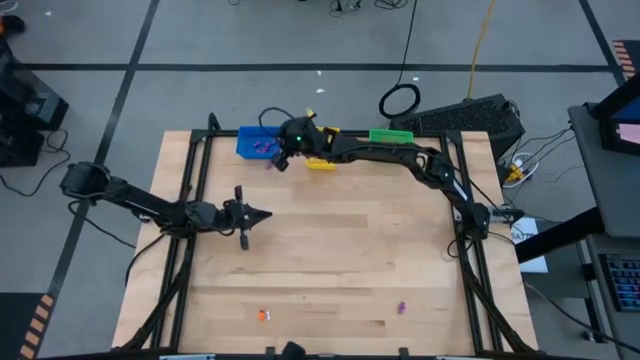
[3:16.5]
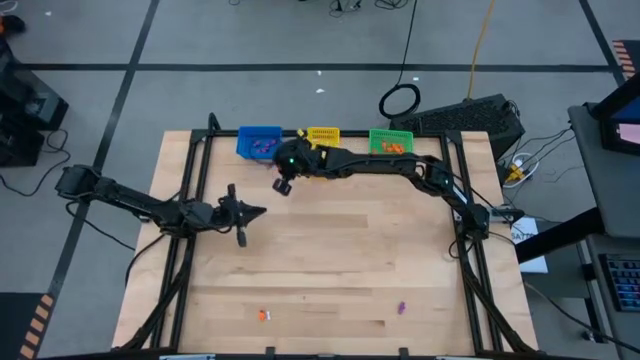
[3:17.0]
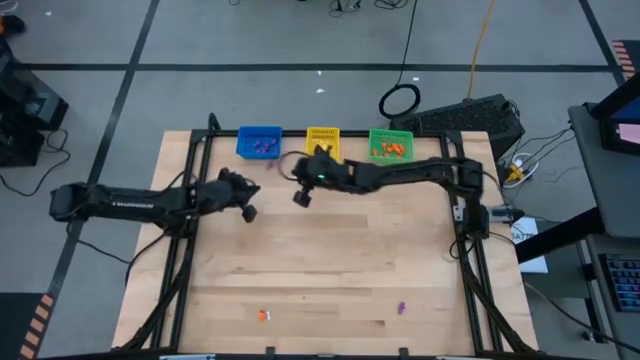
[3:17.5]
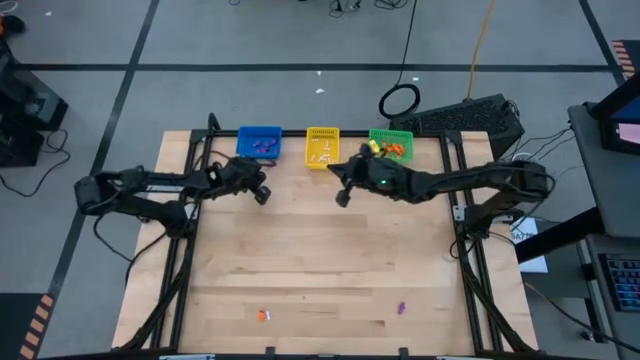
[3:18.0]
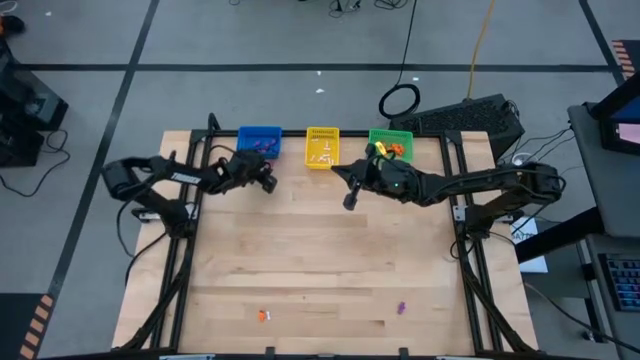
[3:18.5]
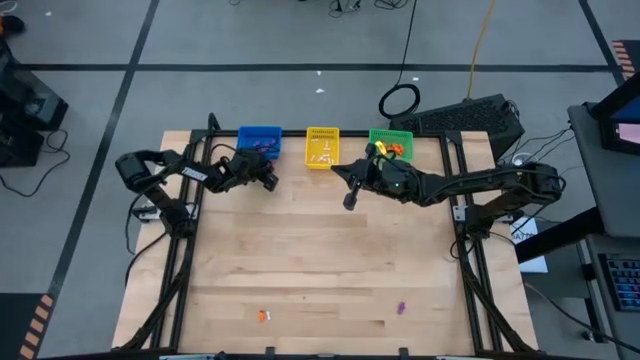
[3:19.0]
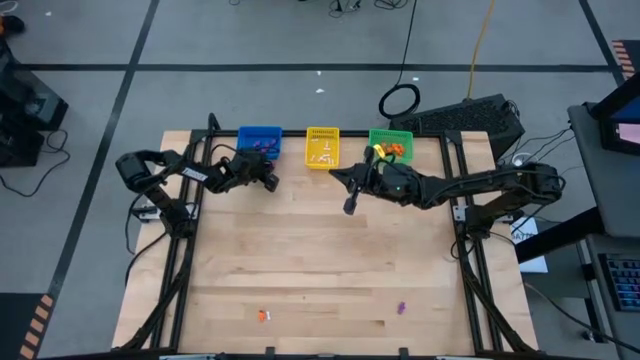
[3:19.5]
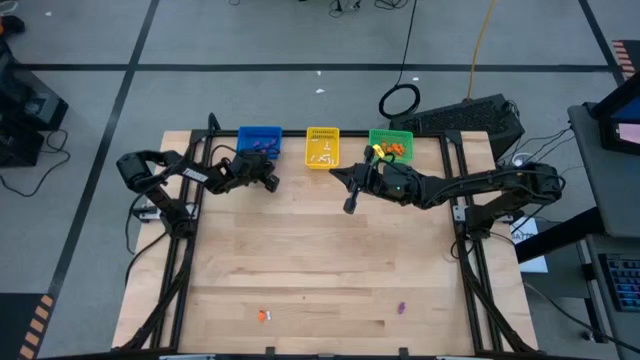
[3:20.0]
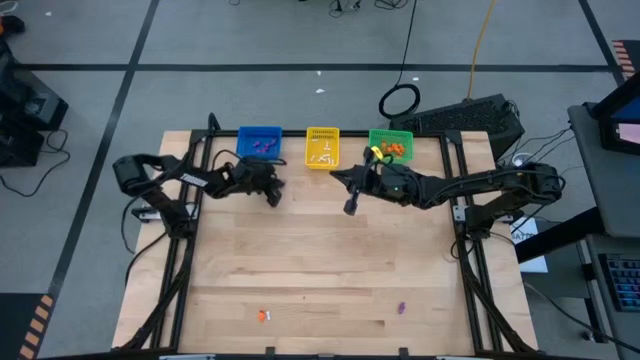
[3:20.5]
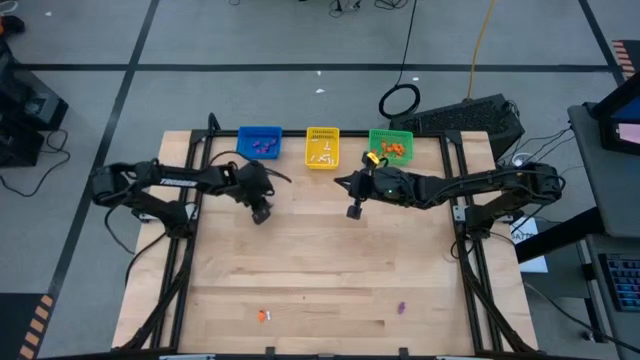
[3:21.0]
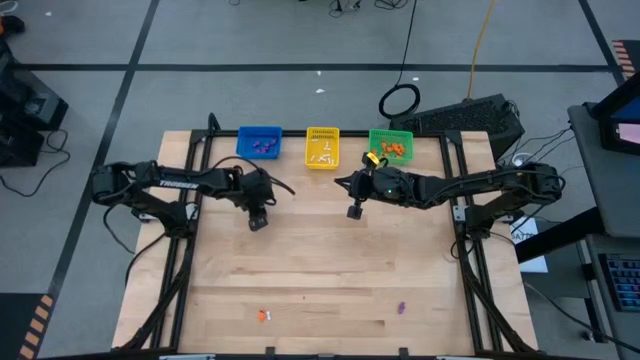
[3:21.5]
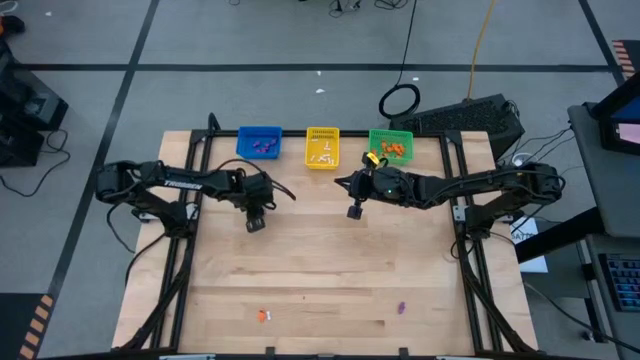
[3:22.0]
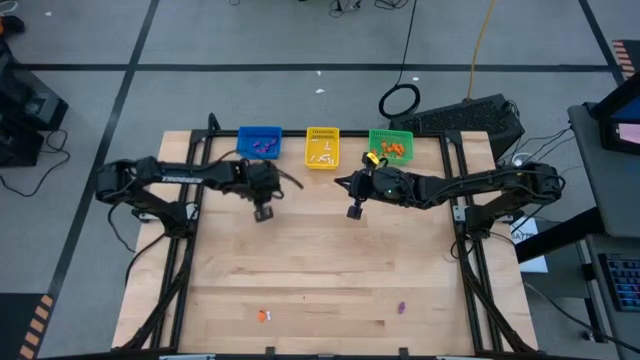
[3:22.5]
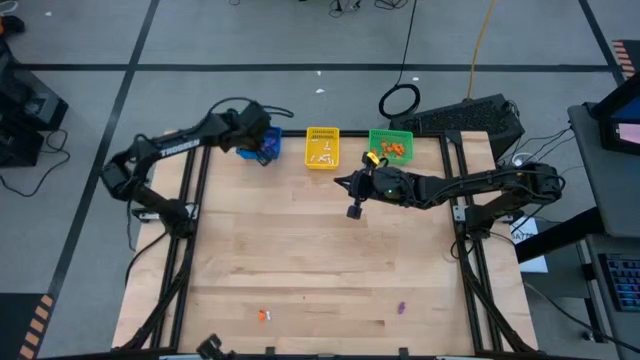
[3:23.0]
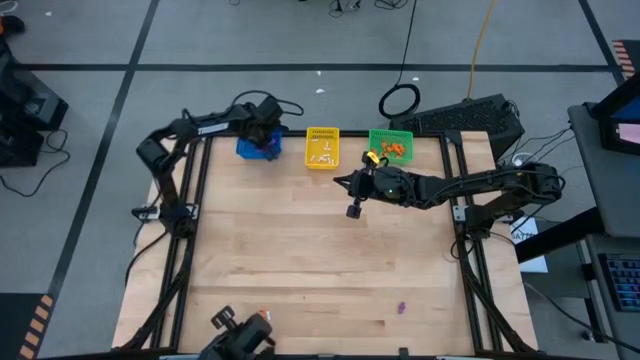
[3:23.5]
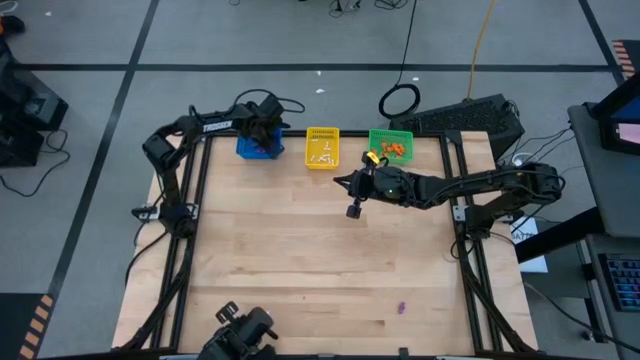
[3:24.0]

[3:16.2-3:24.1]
Task: Sort Halloween decoration
Put the violet skeleton toy into the blue bin

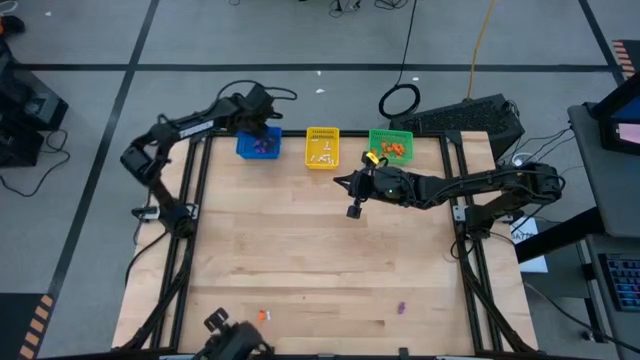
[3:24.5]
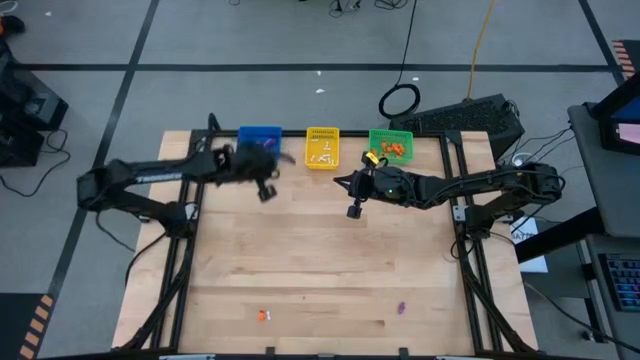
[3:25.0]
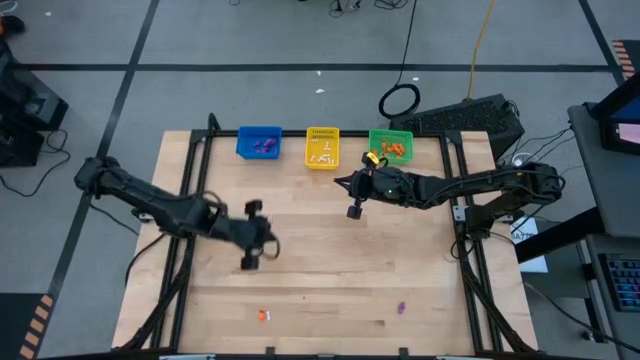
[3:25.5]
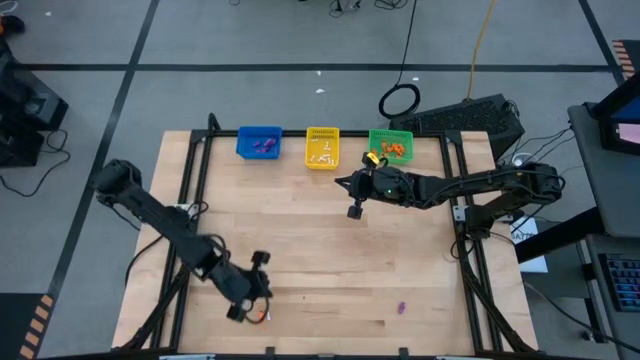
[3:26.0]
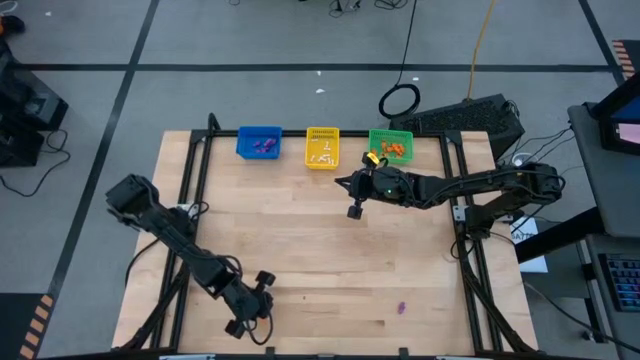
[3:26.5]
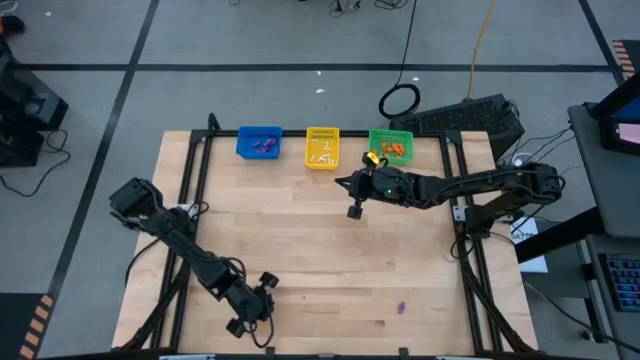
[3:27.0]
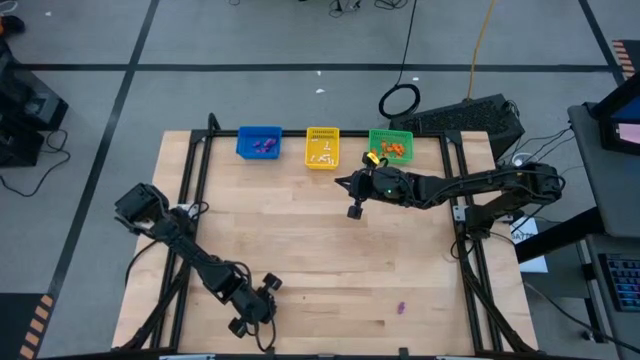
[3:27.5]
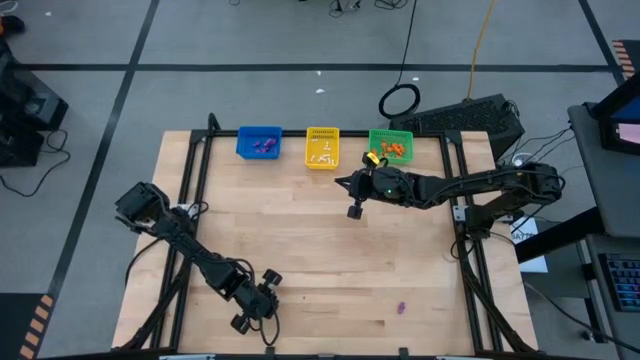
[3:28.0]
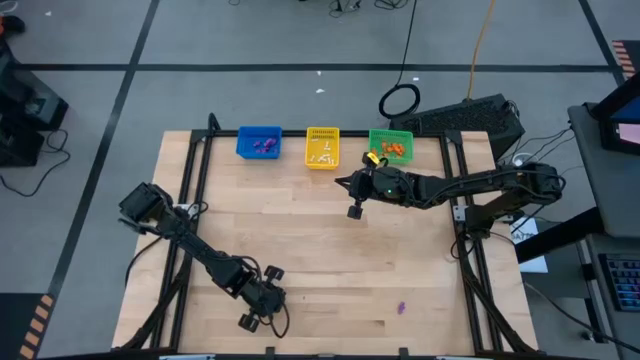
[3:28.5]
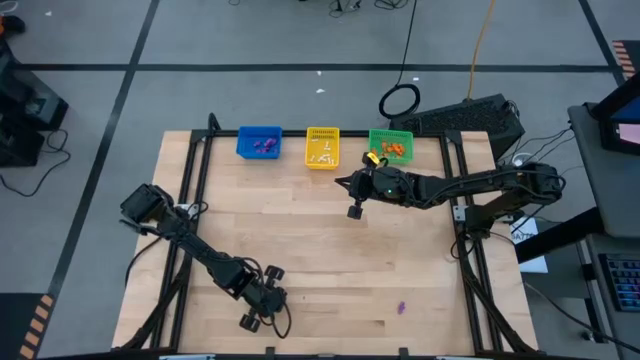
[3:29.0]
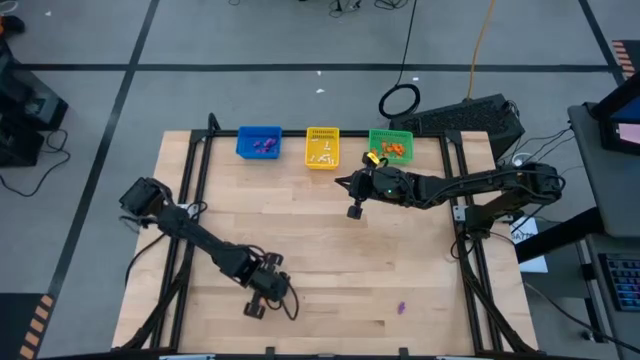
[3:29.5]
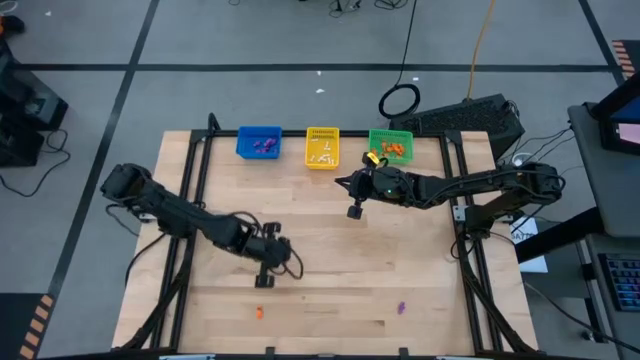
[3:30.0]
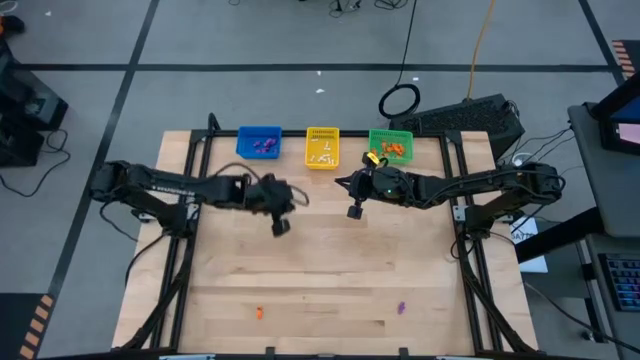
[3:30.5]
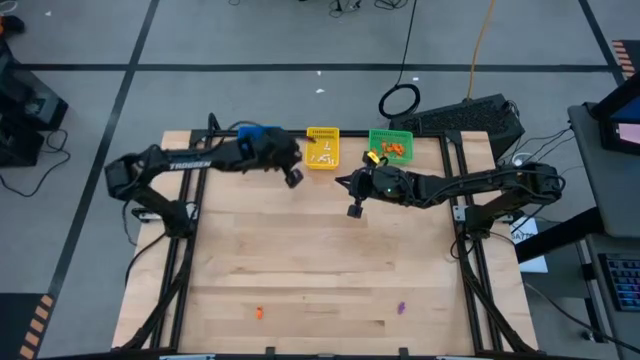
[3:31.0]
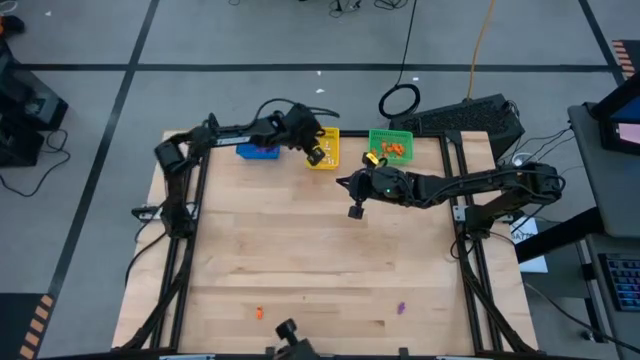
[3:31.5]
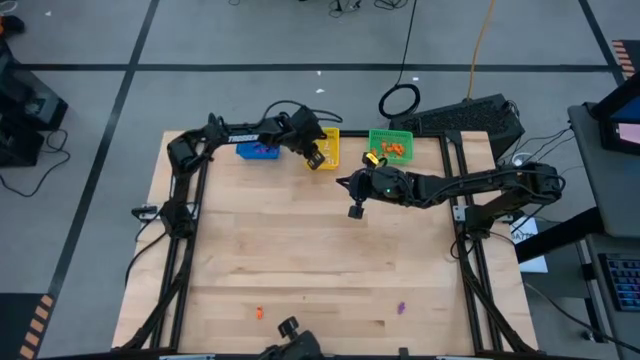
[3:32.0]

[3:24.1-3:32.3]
Put the white bone toy into the yellow bin

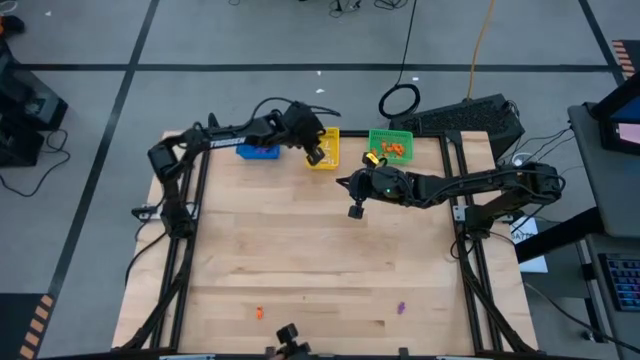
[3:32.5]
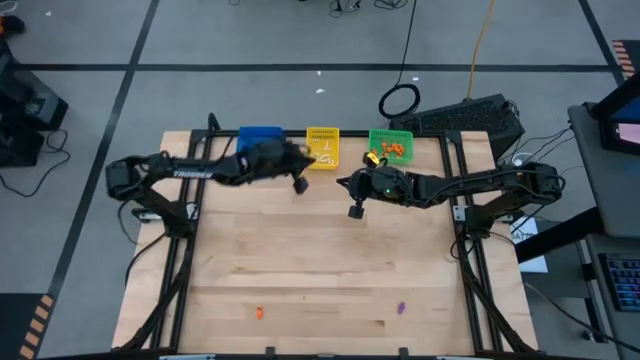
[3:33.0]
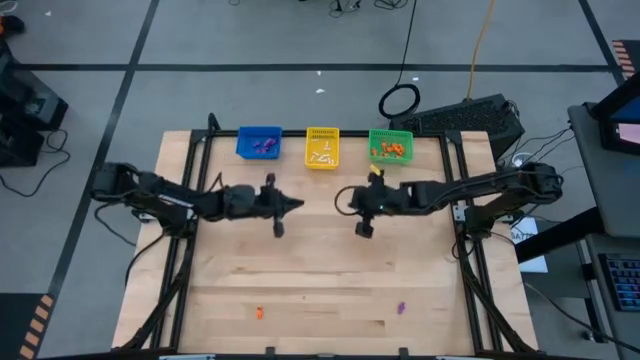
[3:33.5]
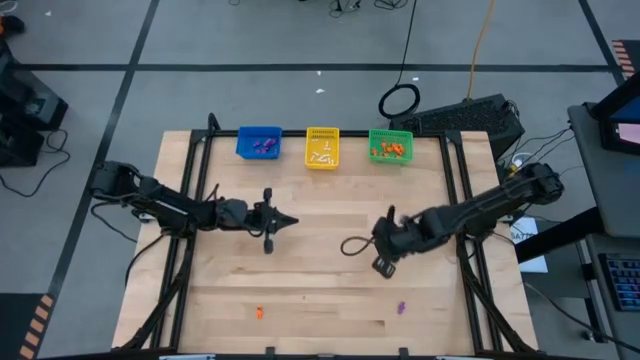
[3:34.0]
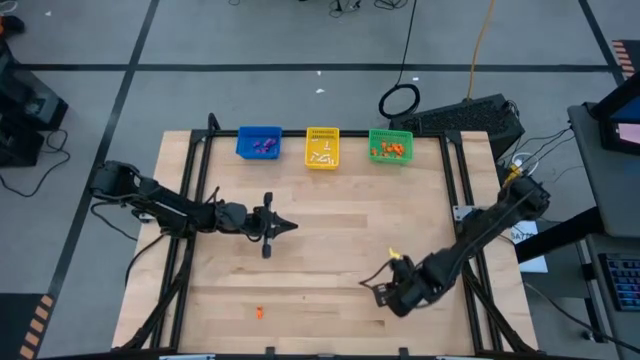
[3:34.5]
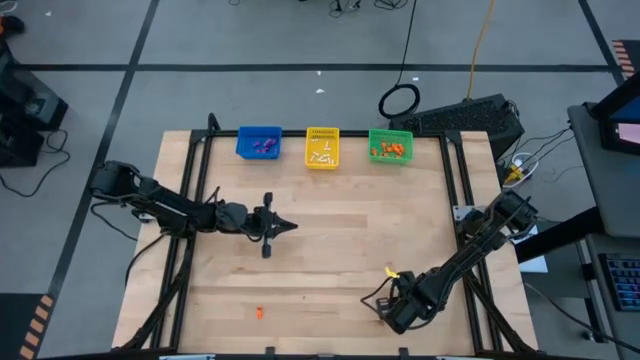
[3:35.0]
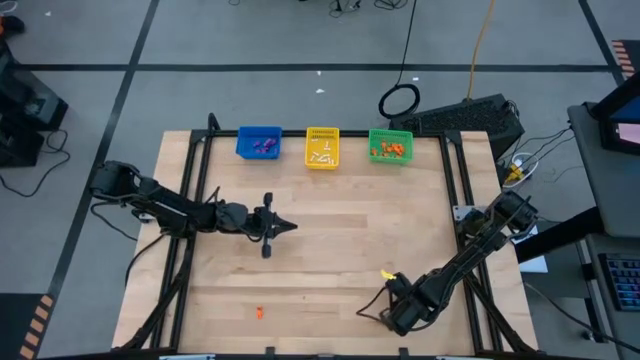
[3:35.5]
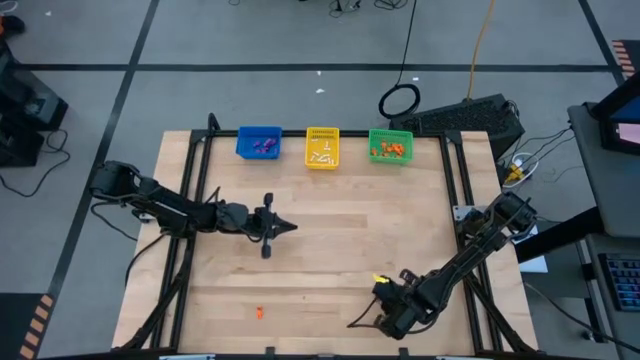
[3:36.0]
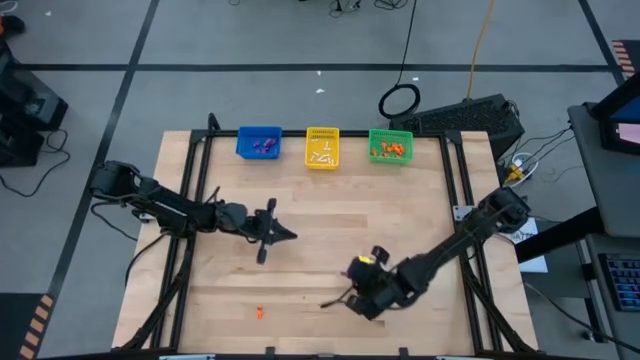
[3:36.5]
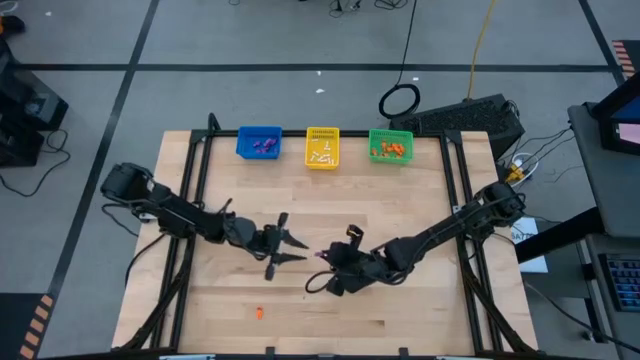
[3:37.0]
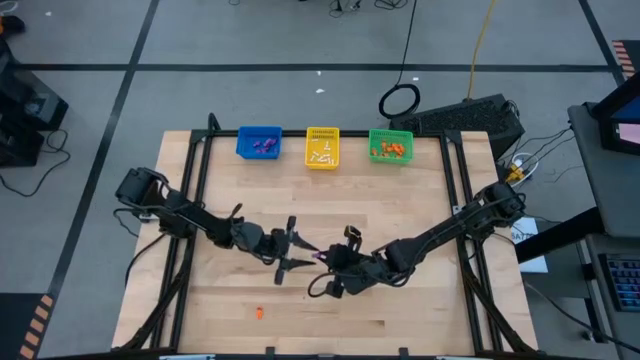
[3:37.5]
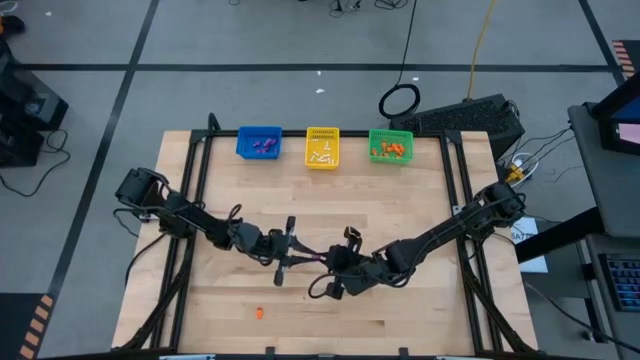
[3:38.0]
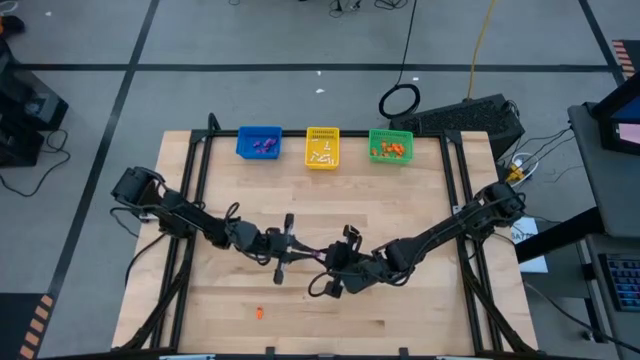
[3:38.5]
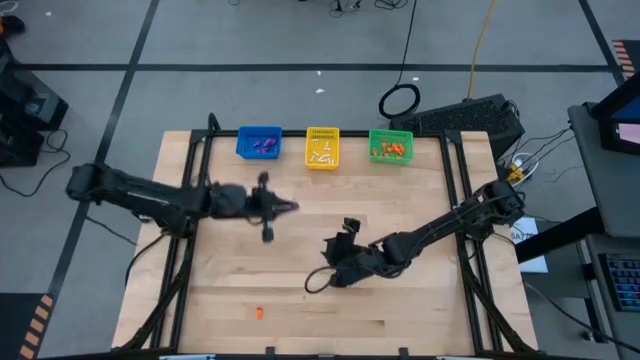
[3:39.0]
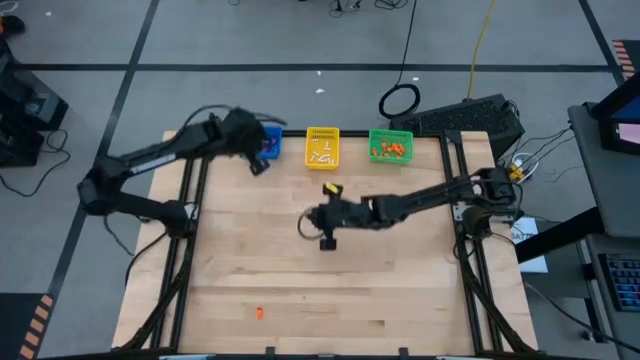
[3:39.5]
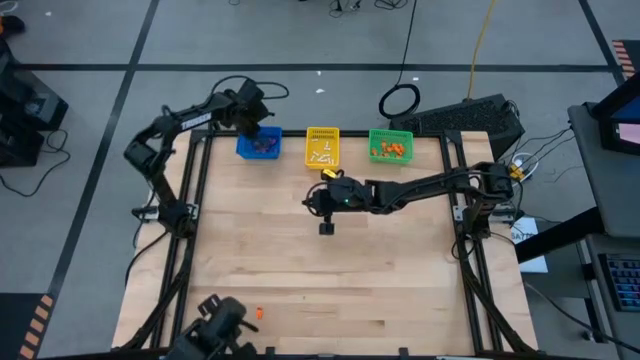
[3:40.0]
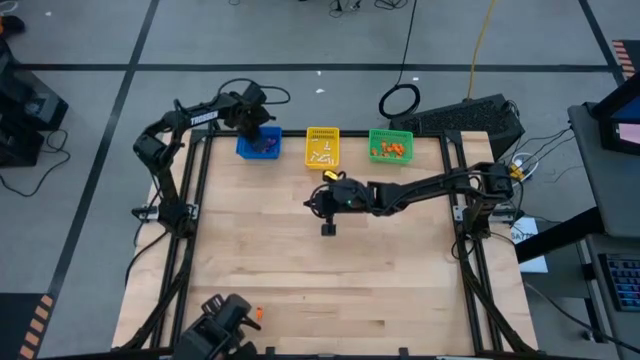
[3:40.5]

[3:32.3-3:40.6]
Put the violet skeleton toy into the blue bin
